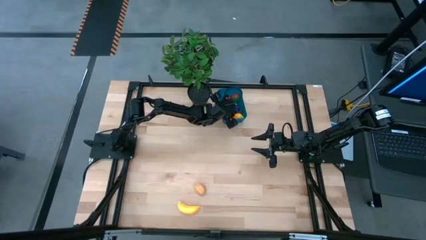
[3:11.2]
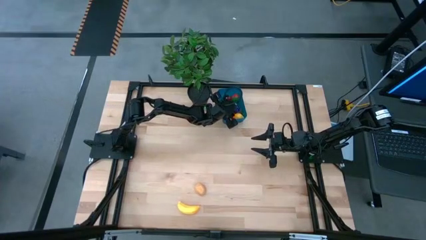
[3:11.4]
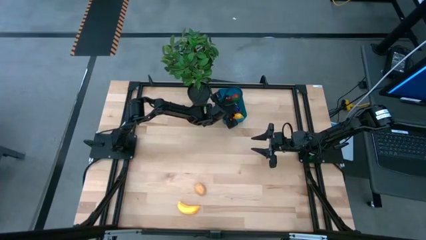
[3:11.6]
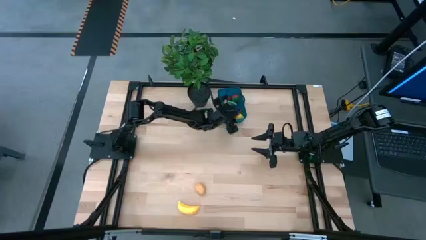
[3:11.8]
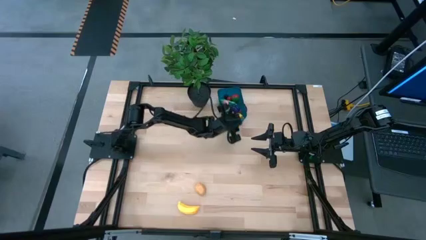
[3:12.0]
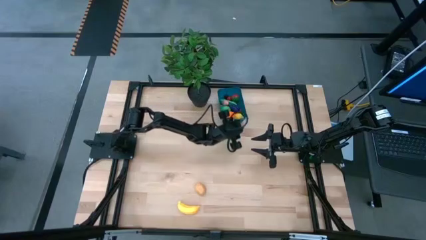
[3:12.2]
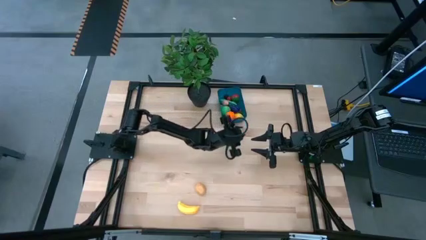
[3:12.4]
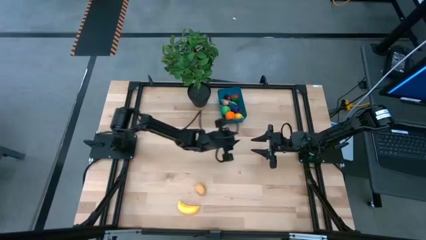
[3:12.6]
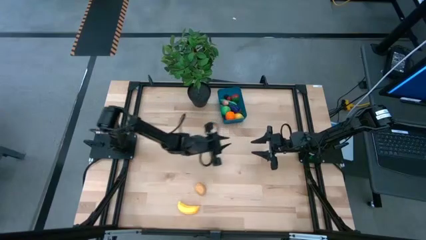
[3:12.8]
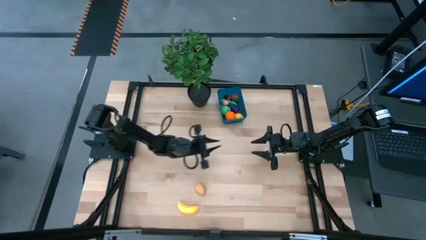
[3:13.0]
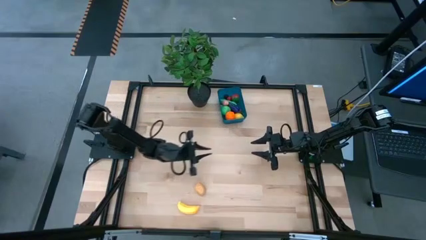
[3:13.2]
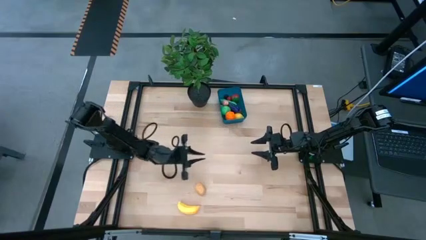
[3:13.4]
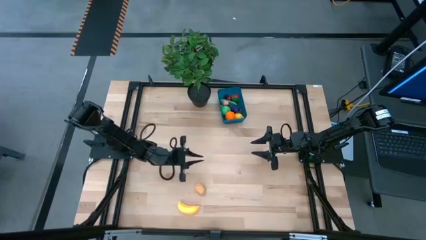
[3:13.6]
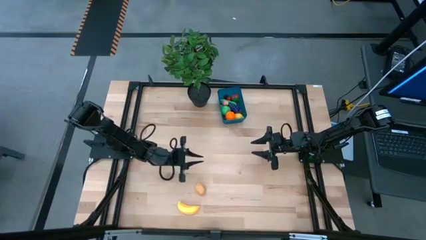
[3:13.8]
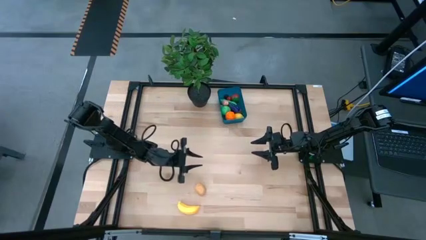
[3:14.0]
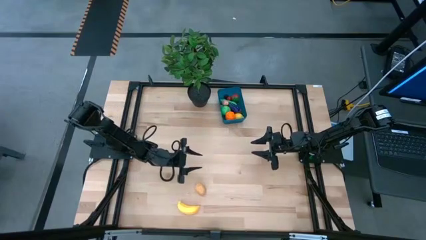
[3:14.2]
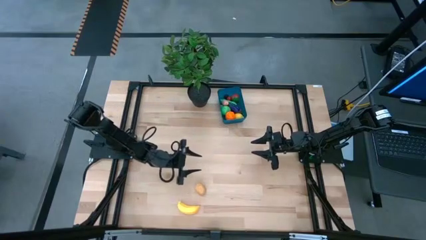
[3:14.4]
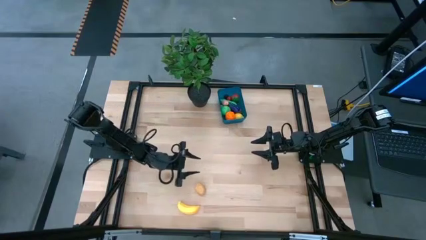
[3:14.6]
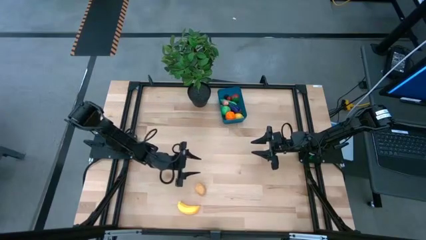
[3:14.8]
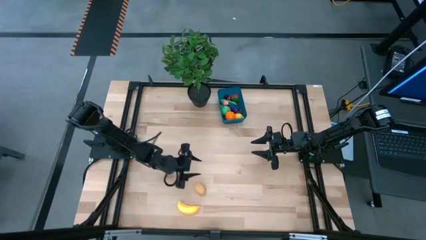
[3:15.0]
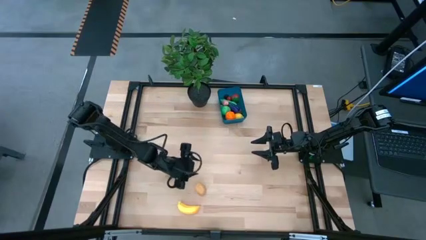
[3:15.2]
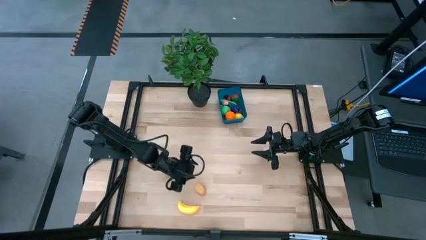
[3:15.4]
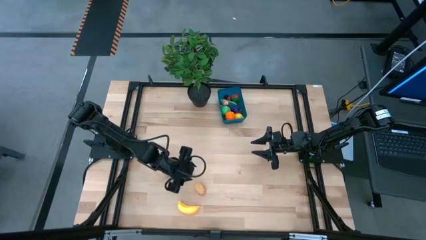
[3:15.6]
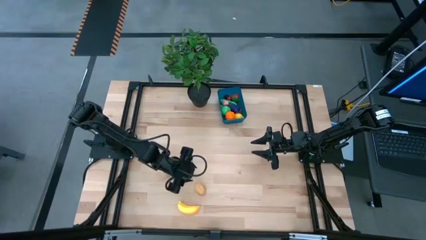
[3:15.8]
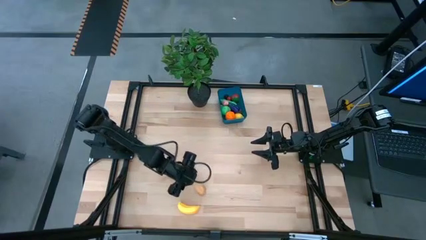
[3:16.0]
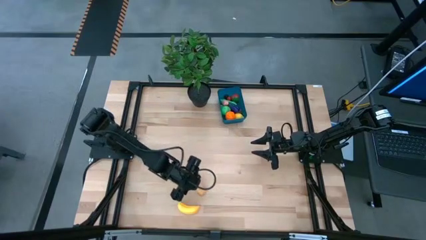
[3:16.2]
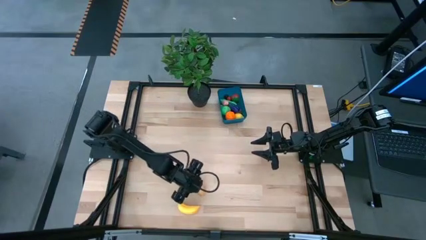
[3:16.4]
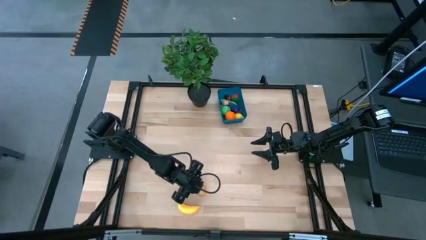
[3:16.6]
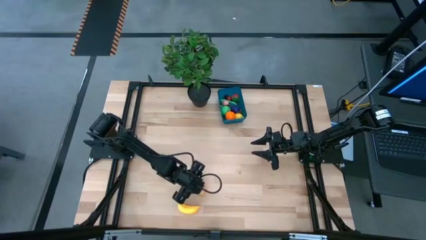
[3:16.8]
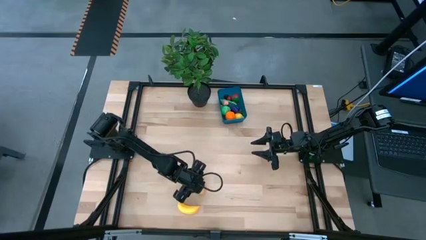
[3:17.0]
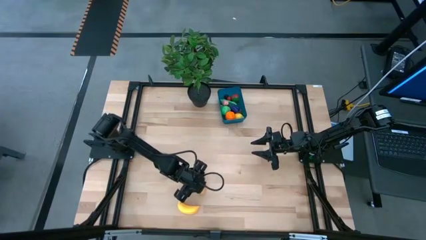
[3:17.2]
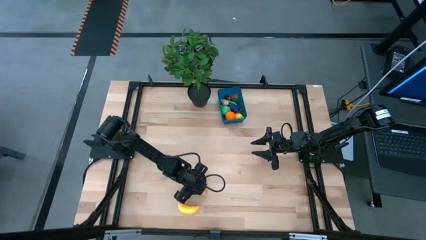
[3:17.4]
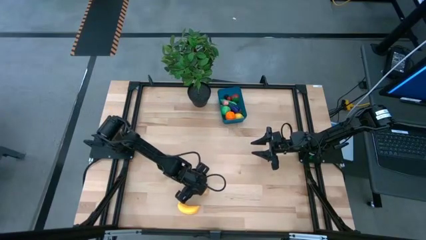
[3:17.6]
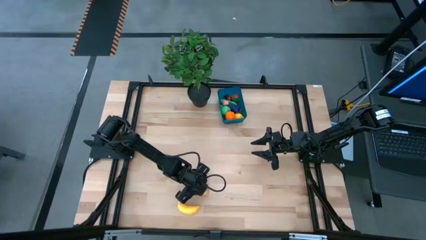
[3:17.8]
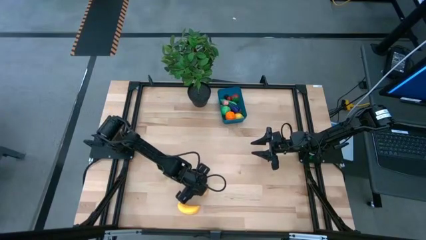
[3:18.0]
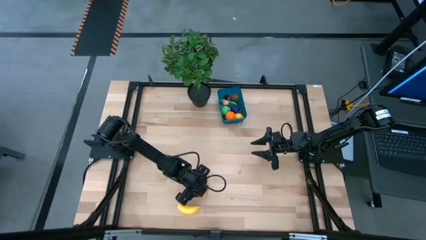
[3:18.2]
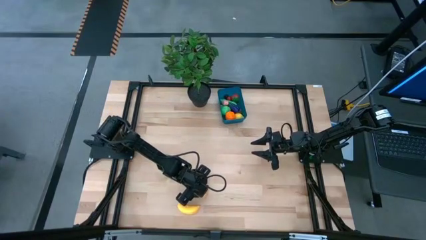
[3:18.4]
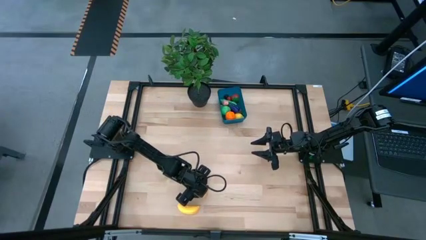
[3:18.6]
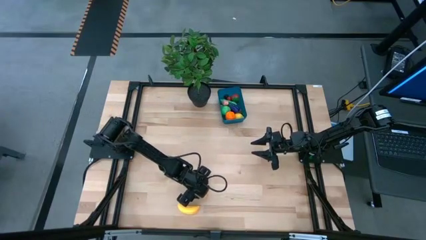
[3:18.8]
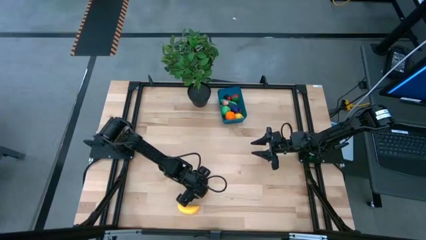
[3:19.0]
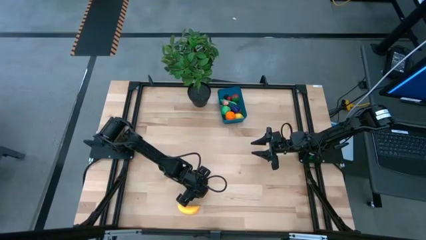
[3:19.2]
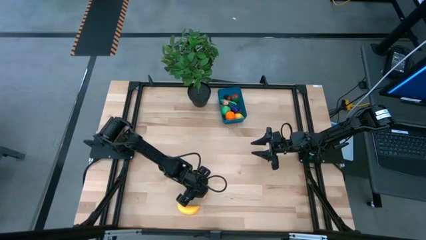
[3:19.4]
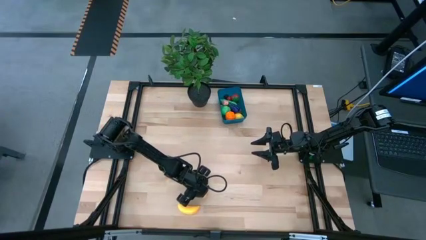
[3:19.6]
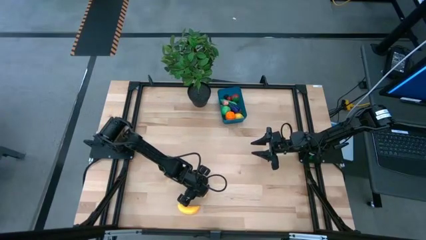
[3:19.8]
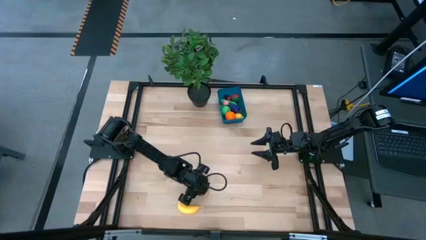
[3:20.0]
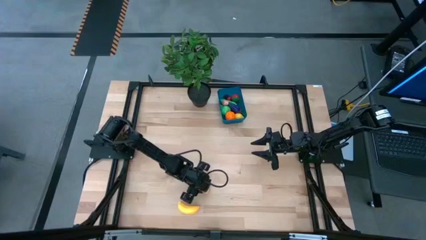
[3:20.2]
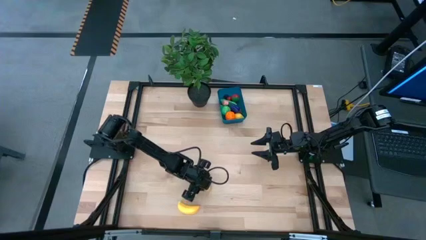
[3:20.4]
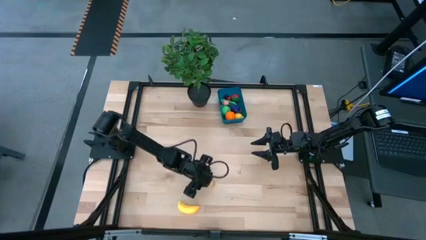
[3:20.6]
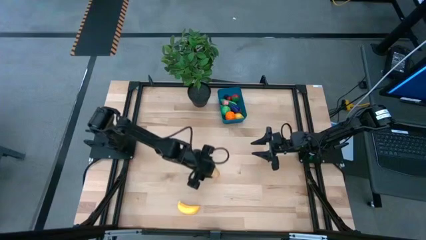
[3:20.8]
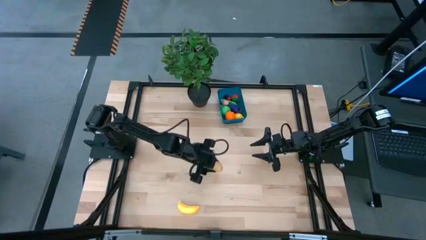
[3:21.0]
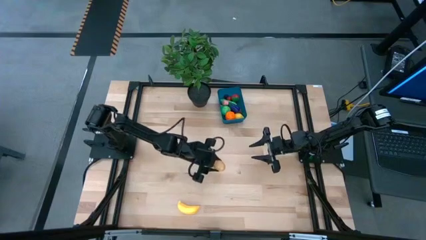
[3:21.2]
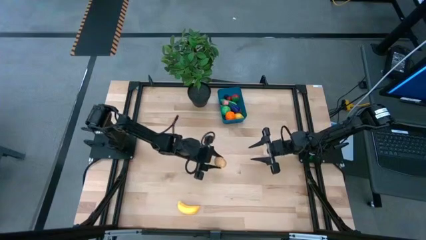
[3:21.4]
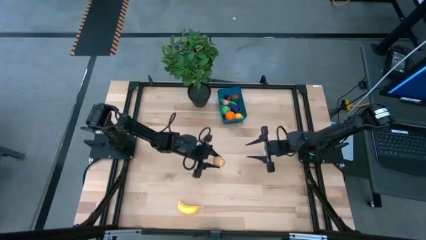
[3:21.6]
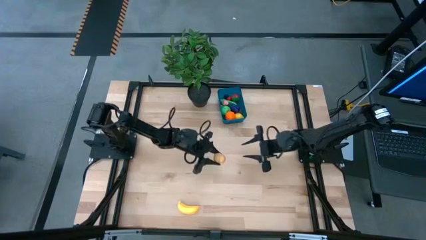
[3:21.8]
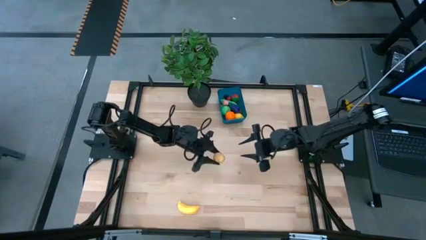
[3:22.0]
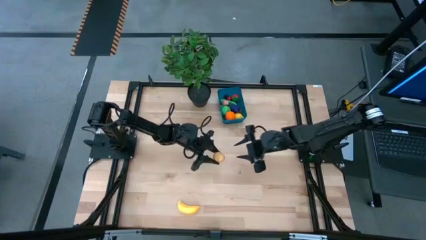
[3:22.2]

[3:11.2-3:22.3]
Task: Pick and placing Produce into tupperware
Put the potato into the blue bin
